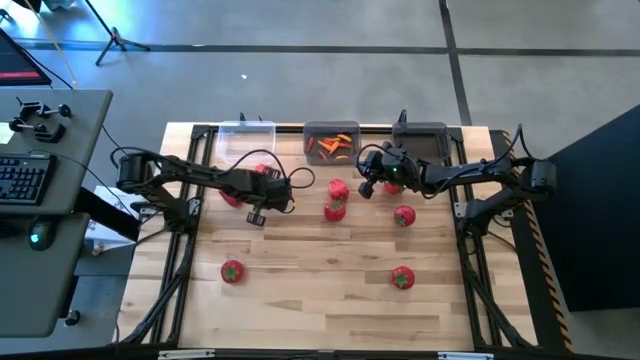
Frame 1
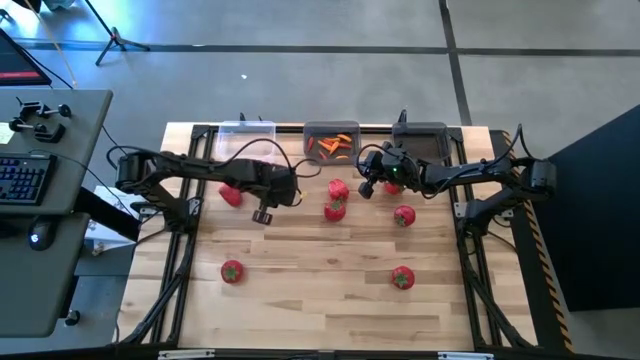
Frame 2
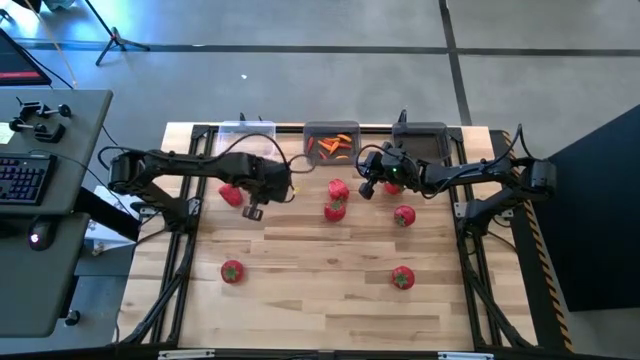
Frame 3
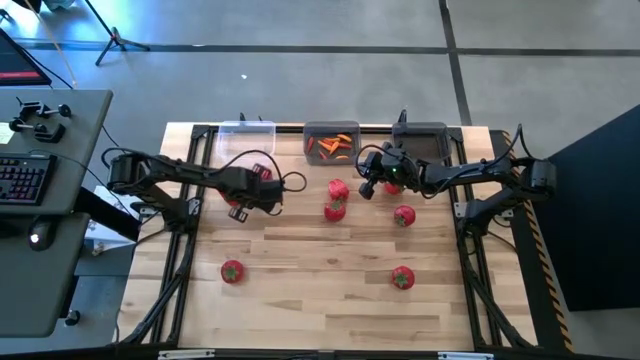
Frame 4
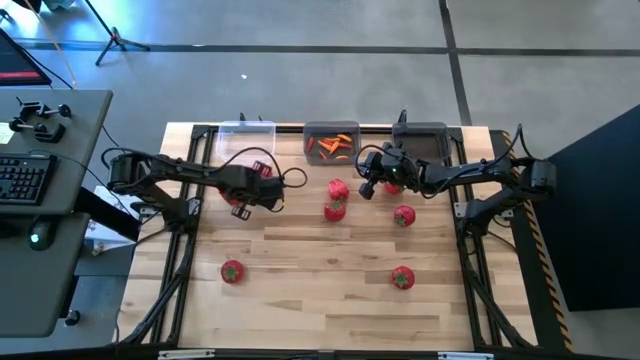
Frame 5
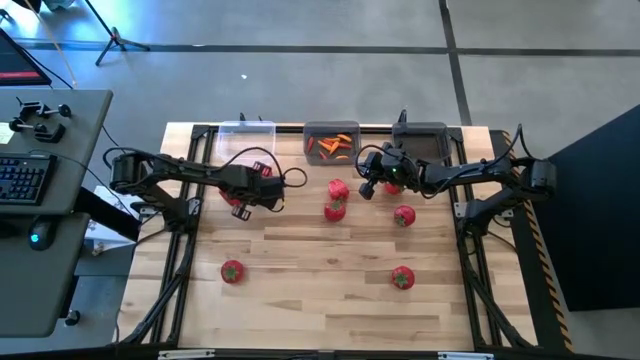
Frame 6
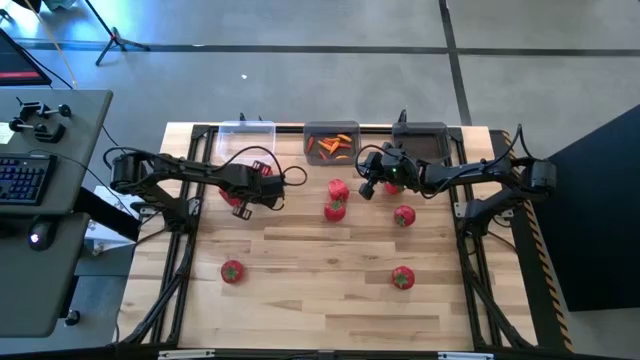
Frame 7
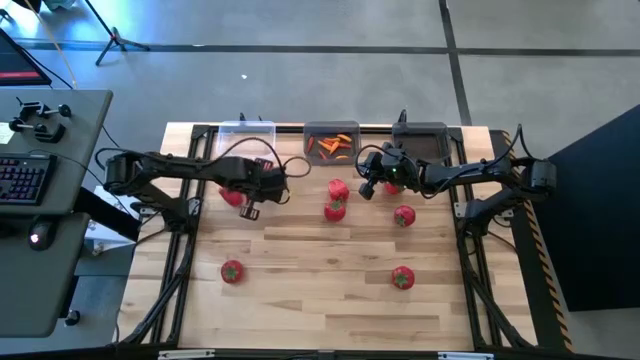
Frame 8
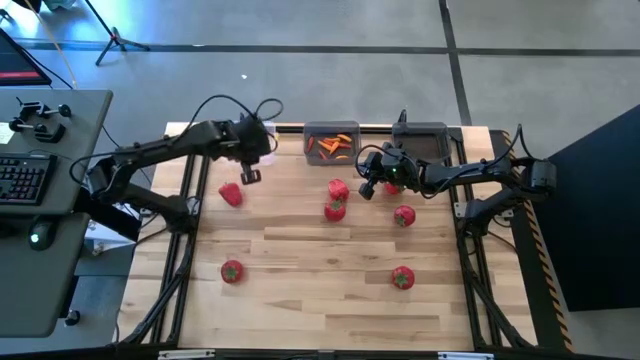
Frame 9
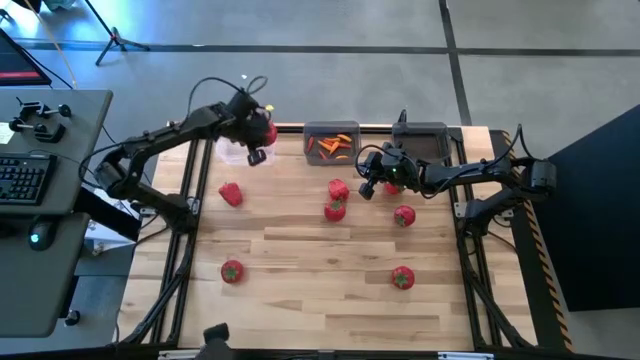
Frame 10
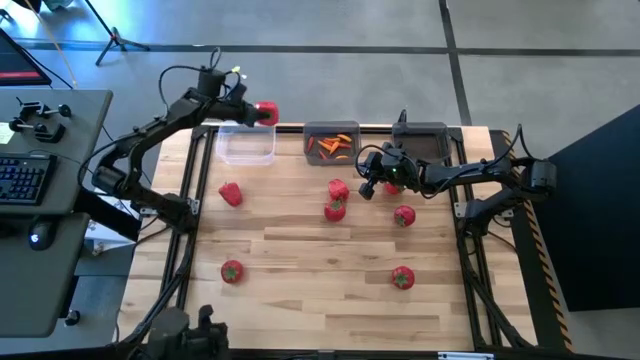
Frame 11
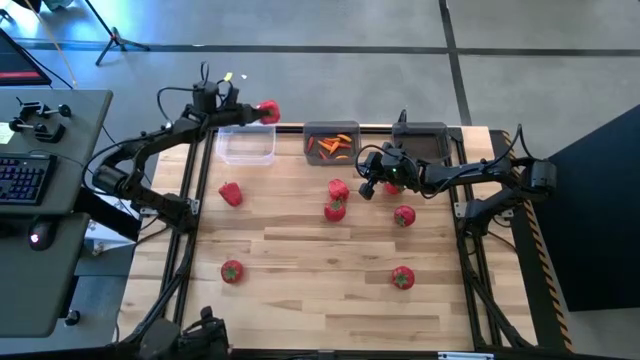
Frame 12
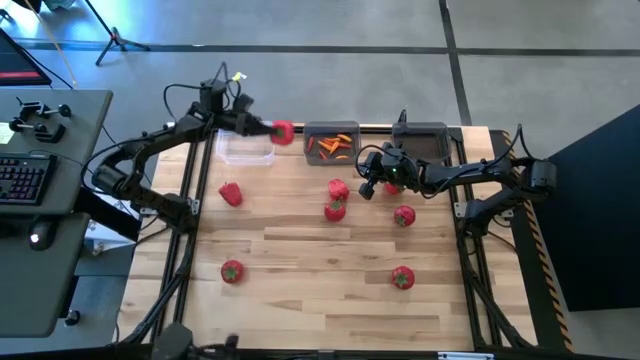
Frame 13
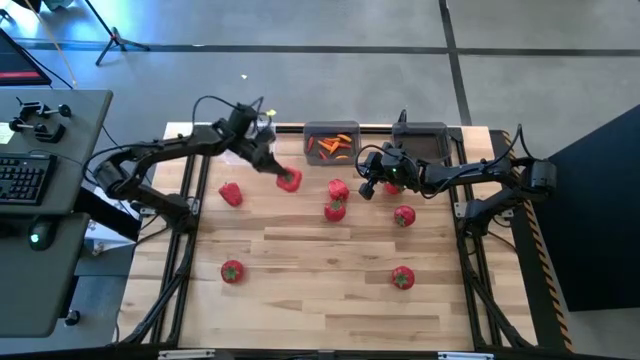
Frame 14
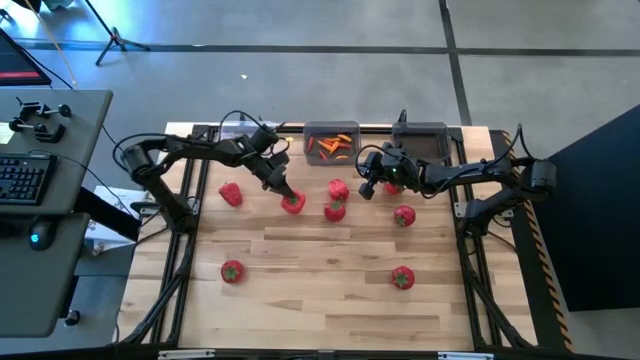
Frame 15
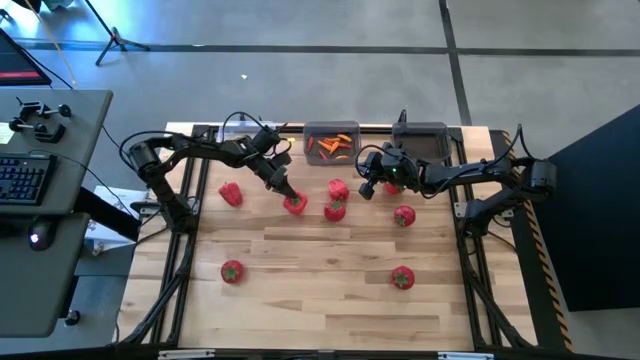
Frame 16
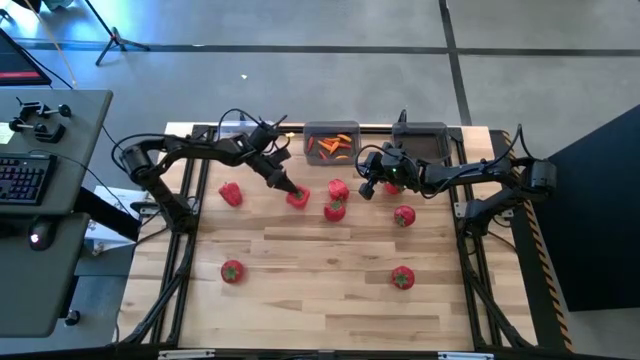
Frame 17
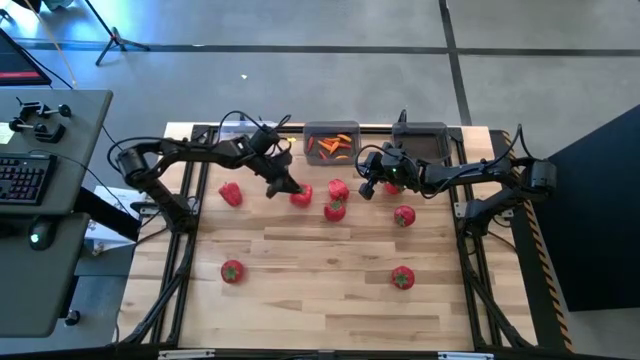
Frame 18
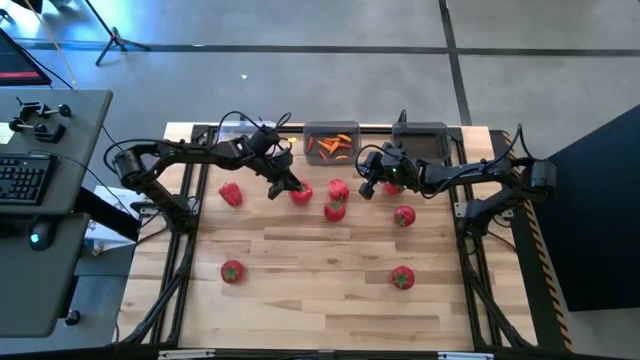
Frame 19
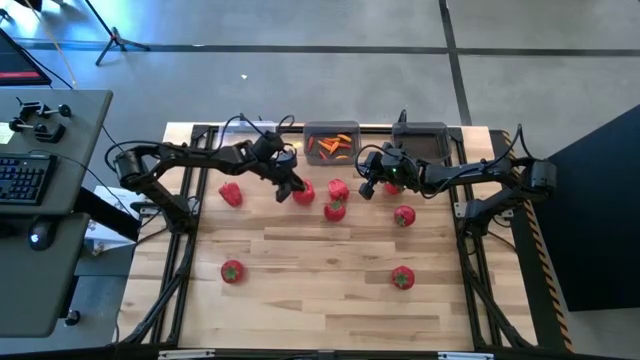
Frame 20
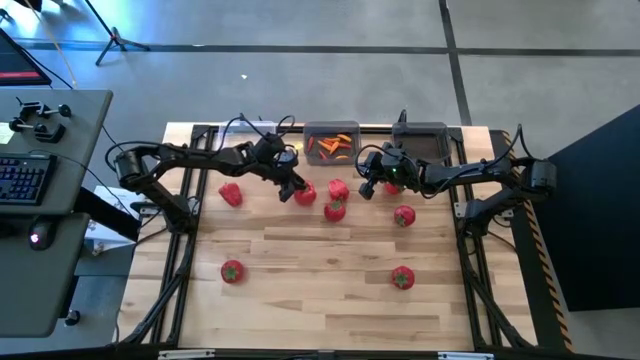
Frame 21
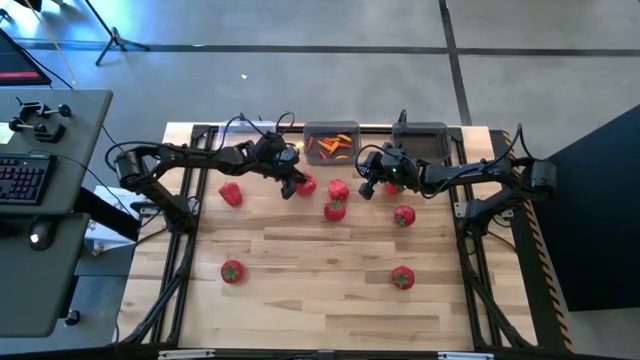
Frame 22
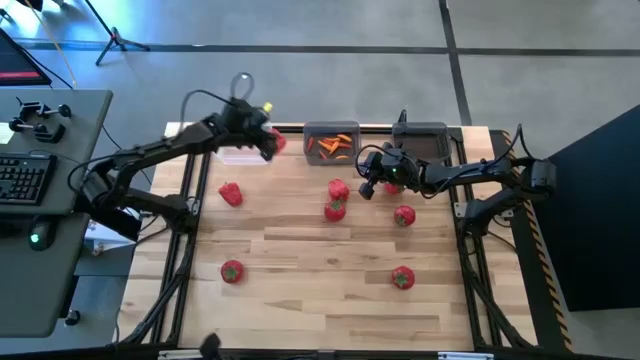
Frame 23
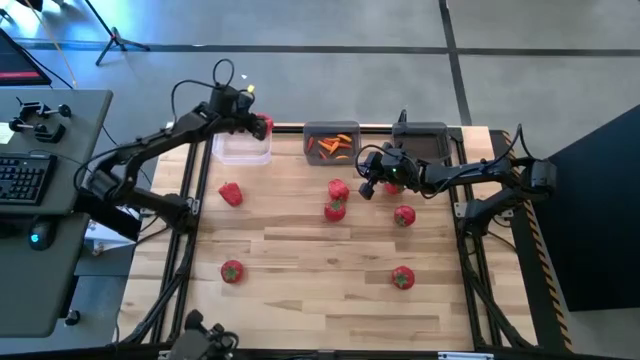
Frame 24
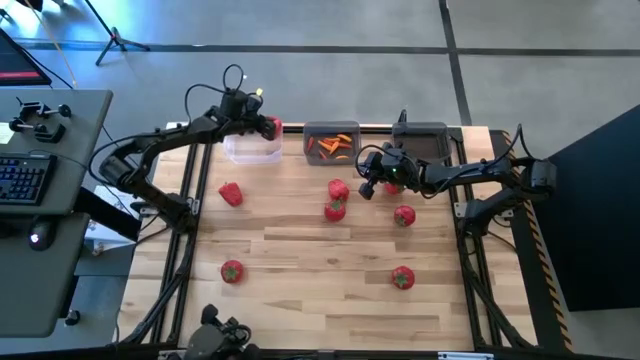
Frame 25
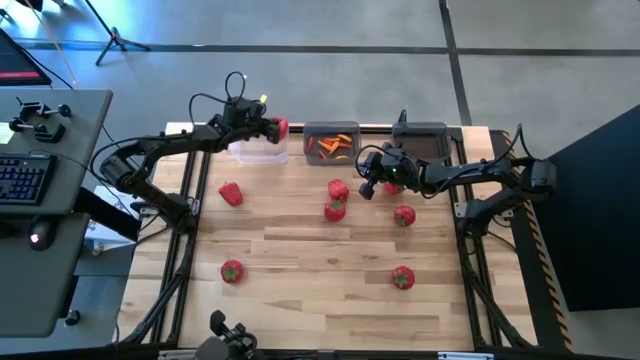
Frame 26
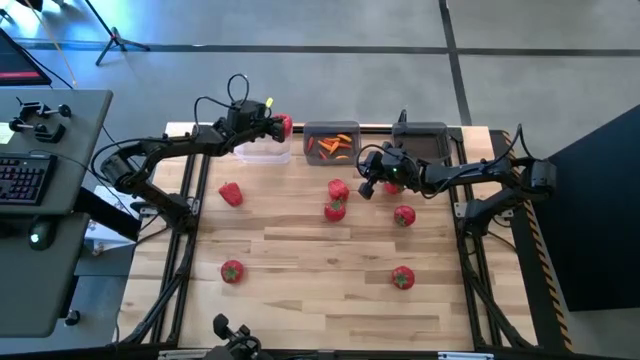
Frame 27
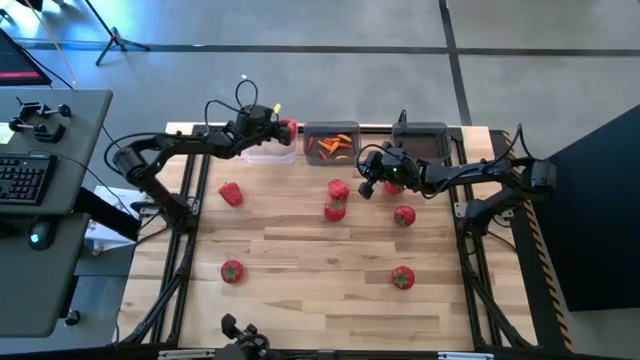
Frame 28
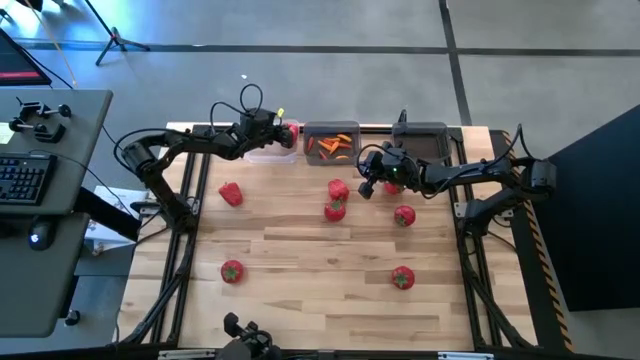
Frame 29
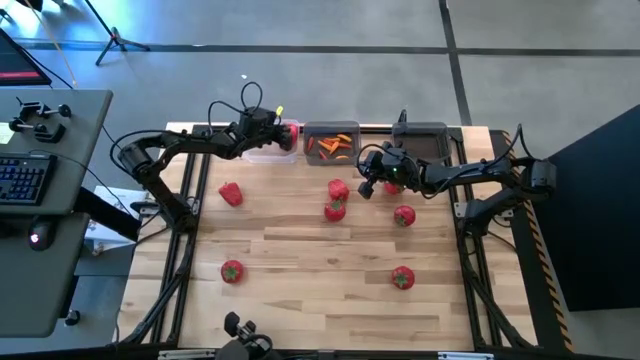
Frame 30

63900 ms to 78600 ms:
Task: Sort produce into baskets
Put the red bell pepper into the transparent bin

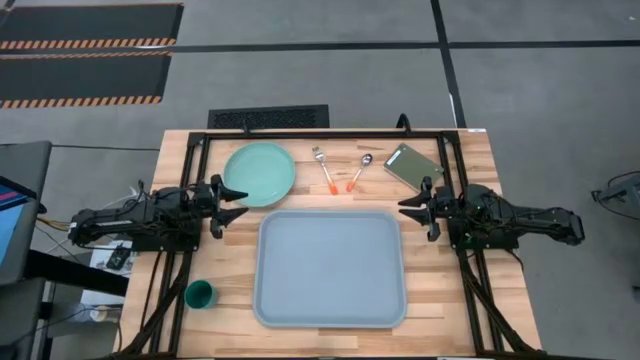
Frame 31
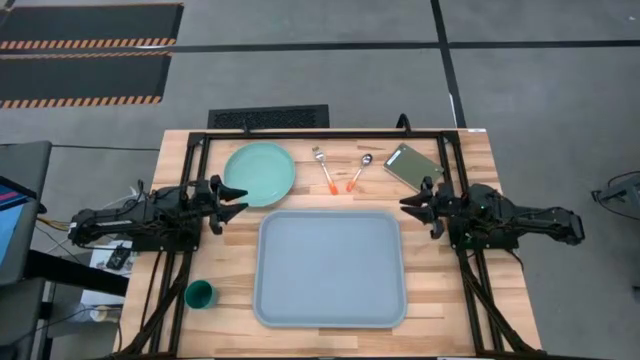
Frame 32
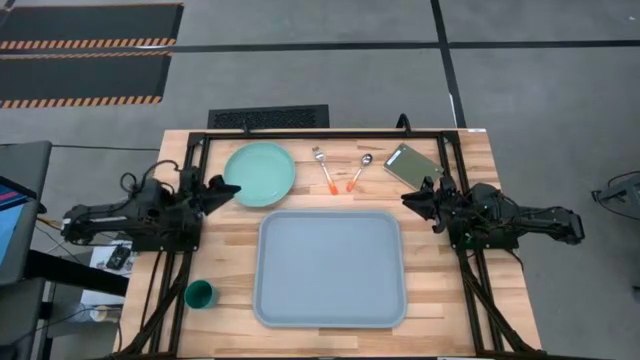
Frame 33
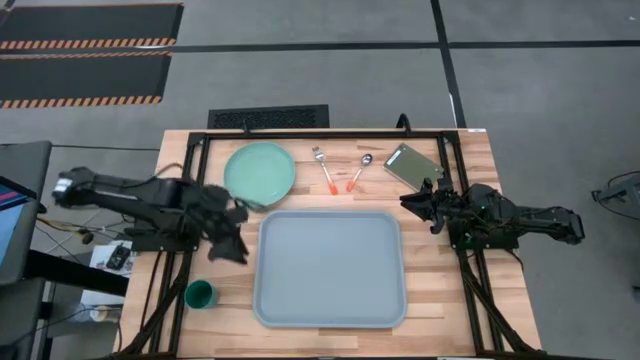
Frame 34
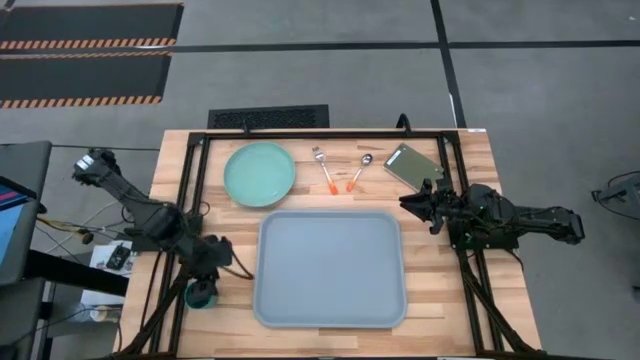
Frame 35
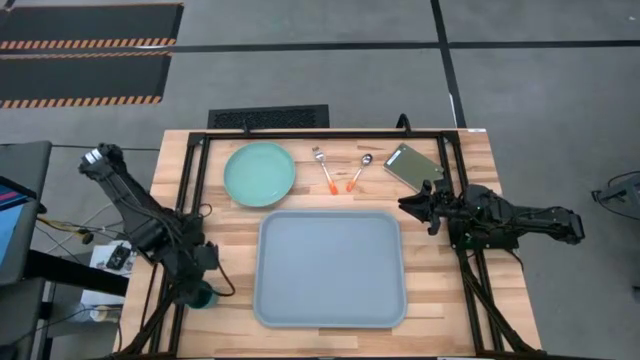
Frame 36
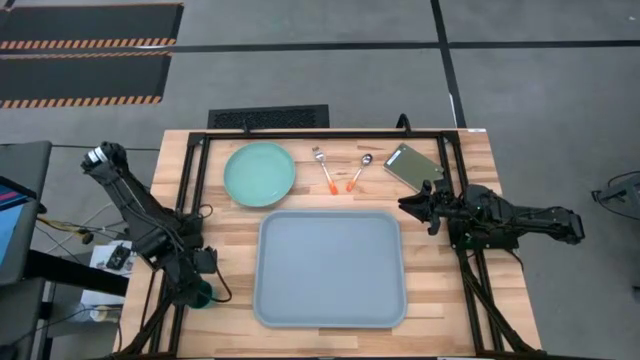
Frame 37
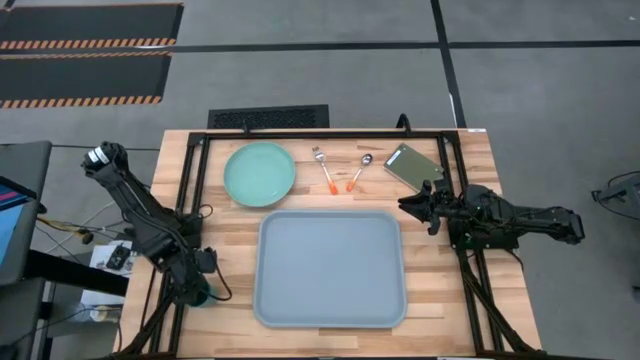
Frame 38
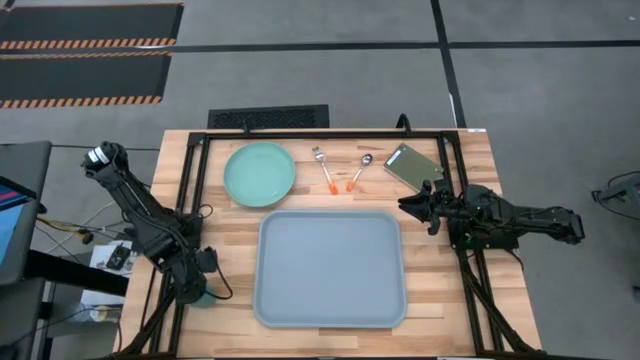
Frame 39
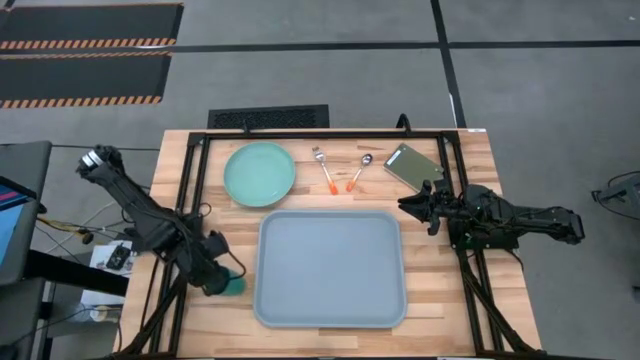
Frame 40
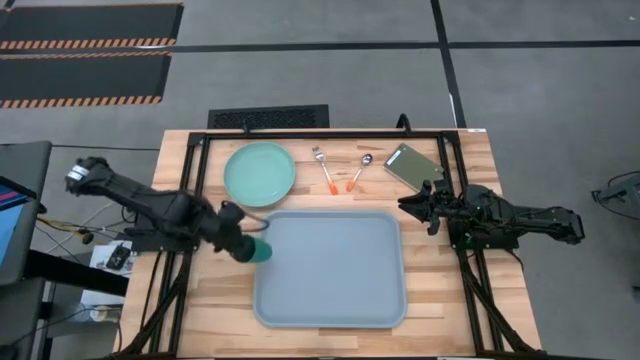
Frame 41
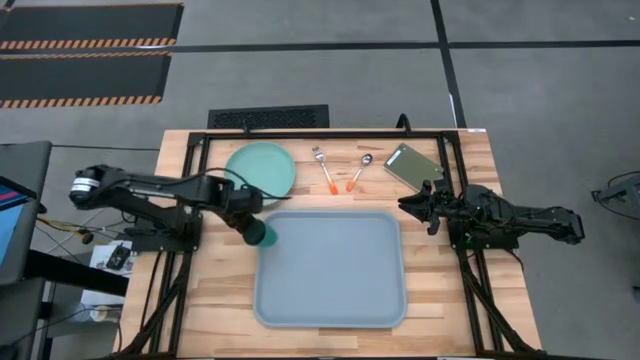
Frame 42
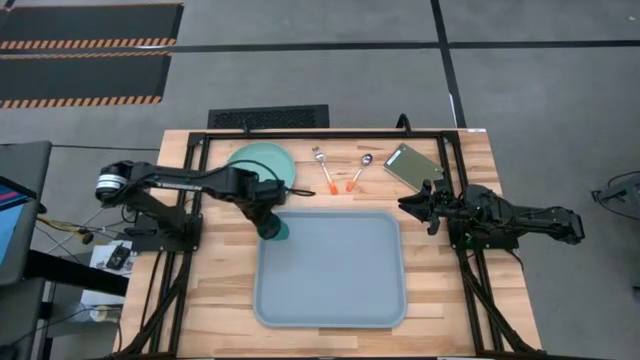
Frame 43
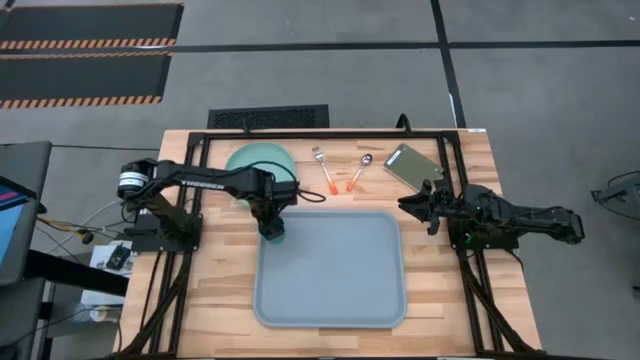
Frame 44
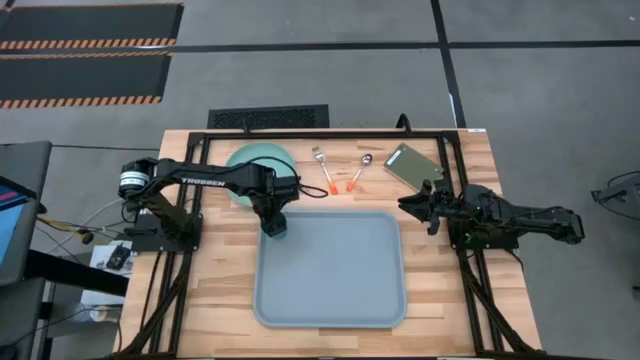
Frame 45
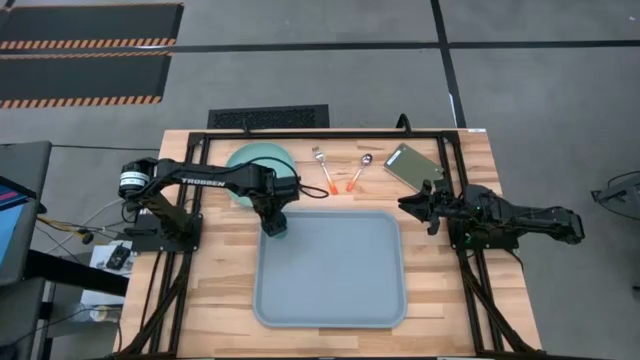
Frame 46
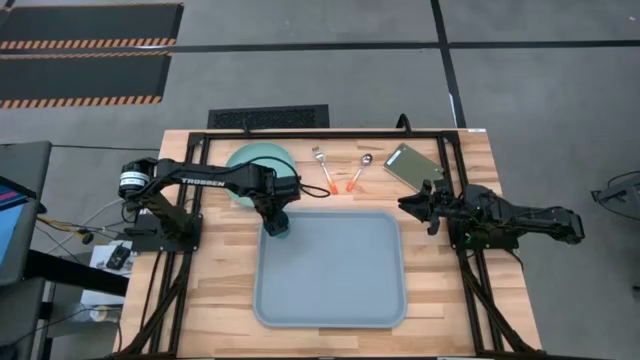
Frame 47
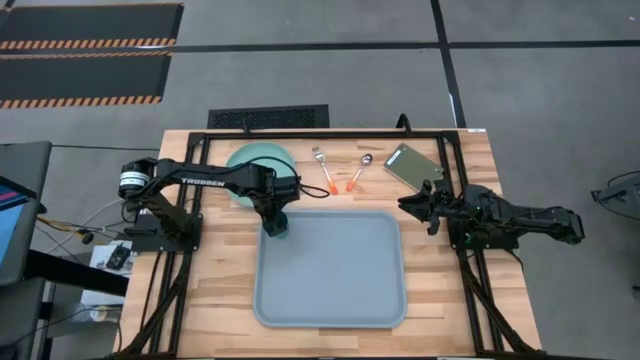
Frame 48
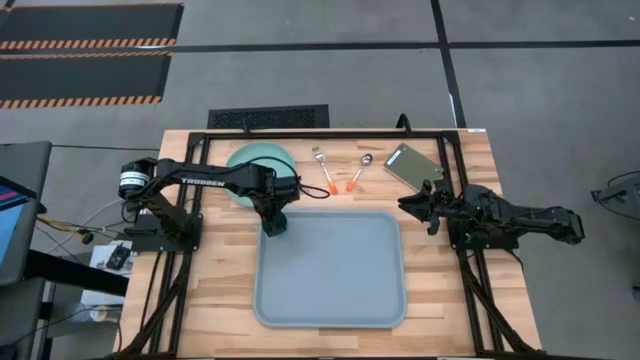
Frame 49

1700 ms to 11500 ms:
Task: Pick and place plate/cup/fork/spoon on tray
Put the green cup on the gray tray
